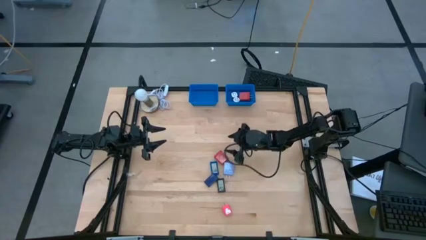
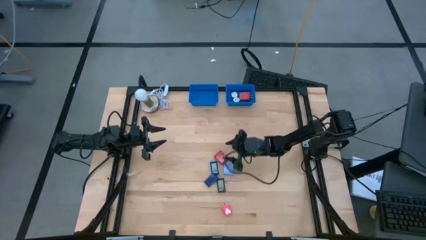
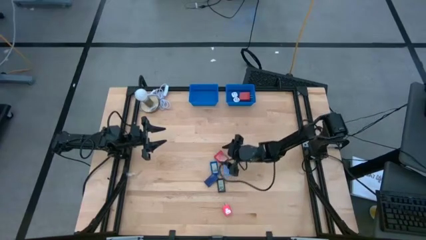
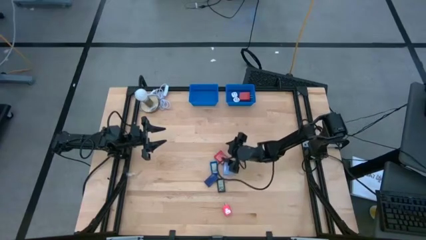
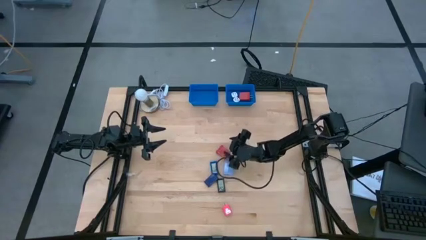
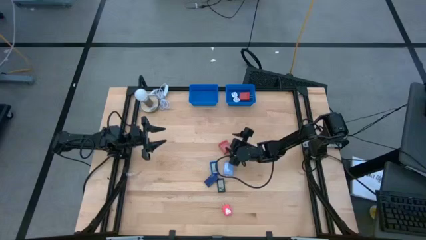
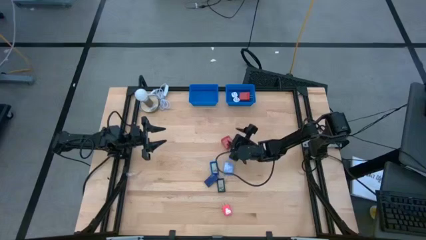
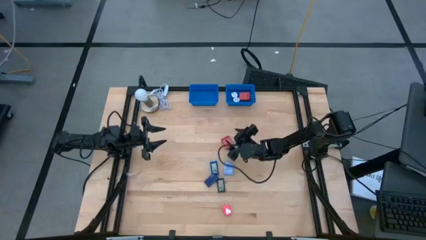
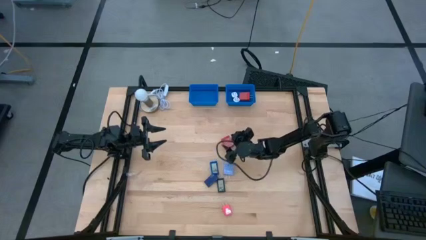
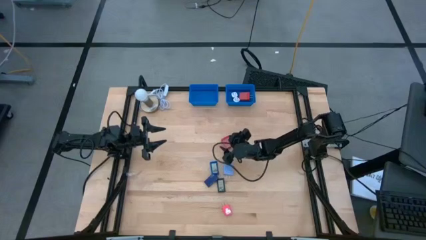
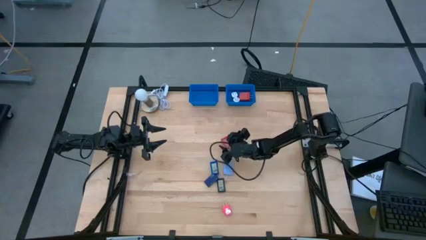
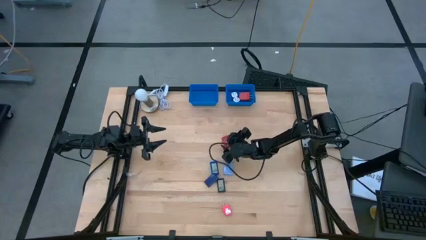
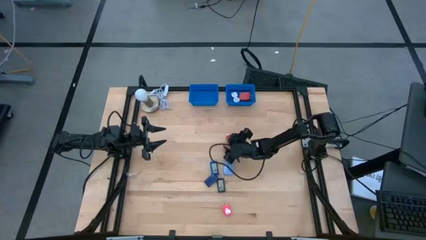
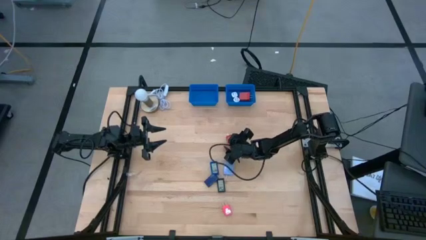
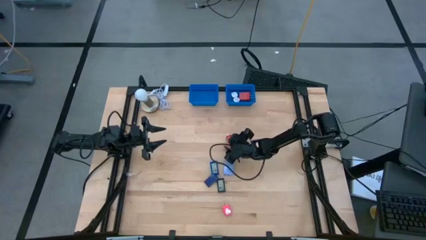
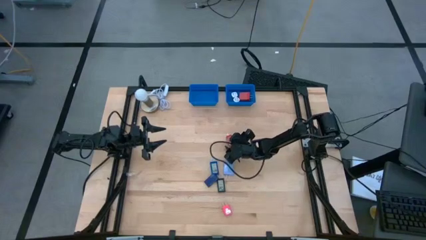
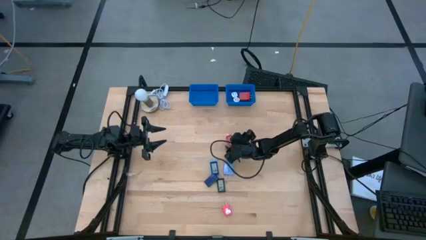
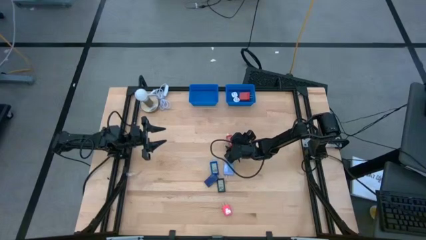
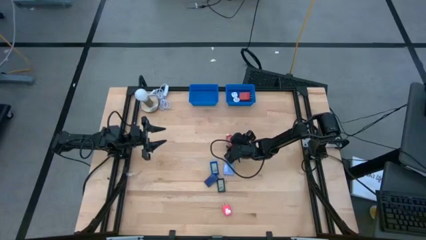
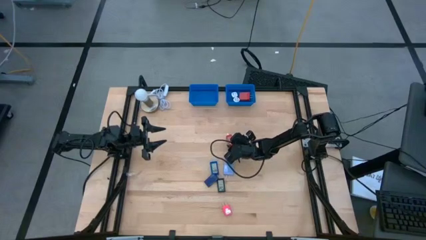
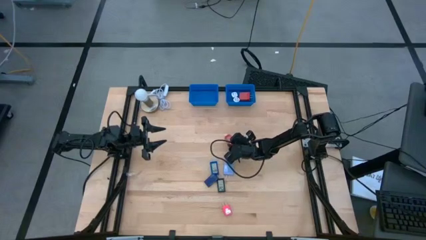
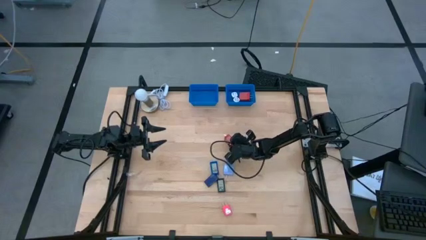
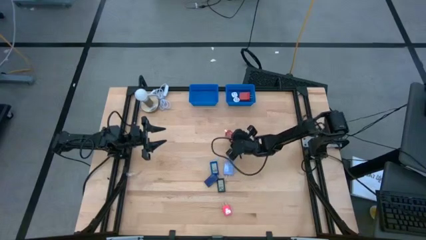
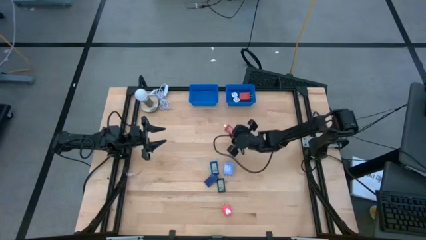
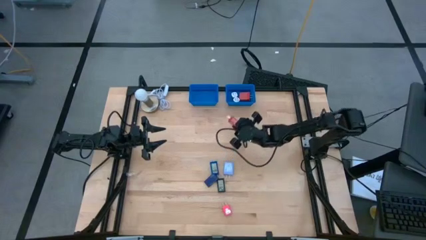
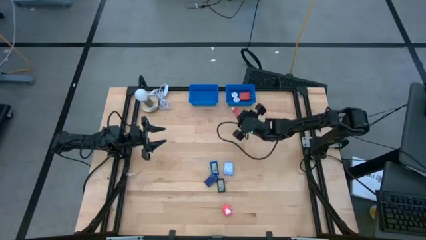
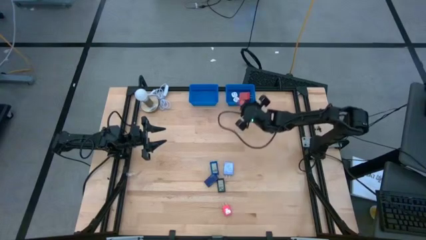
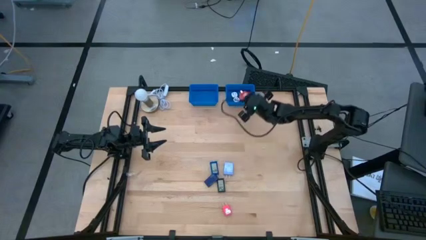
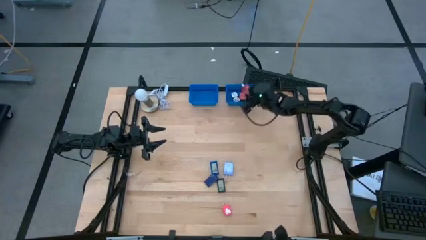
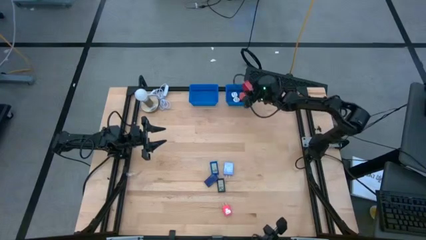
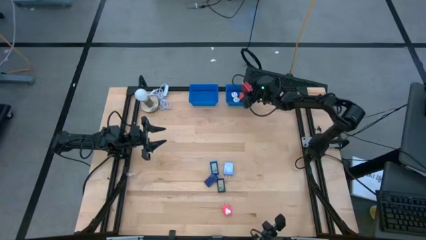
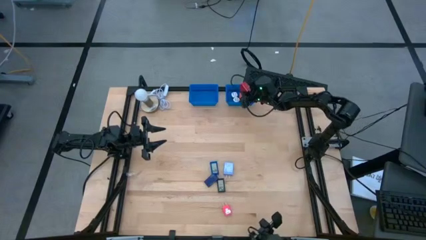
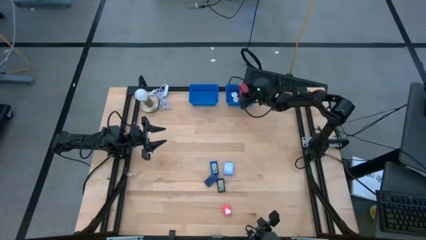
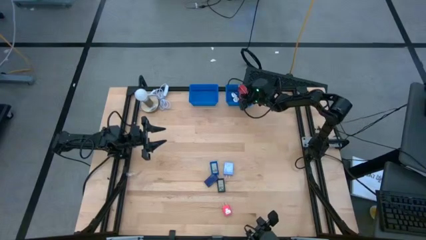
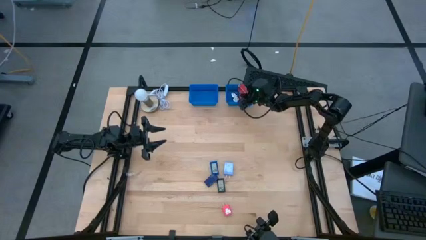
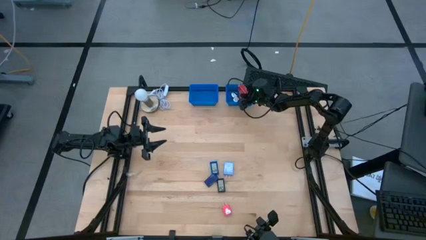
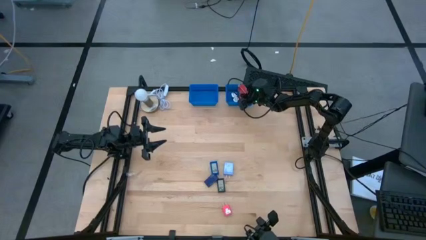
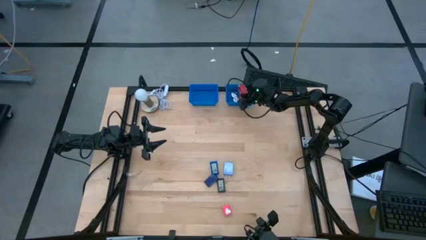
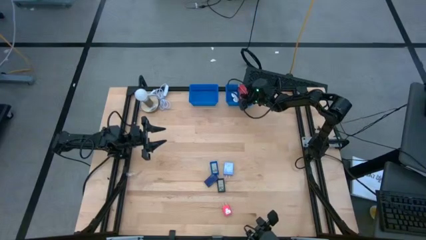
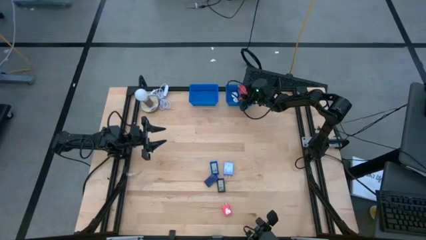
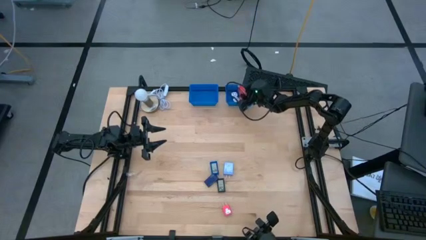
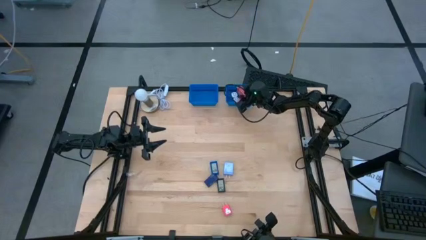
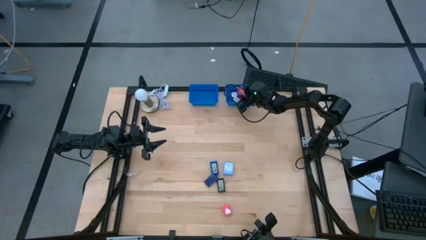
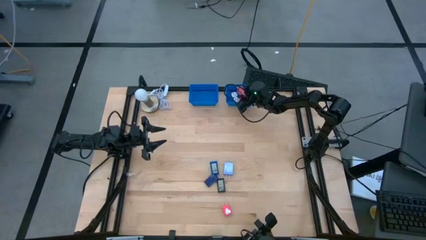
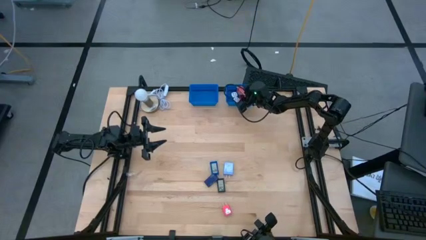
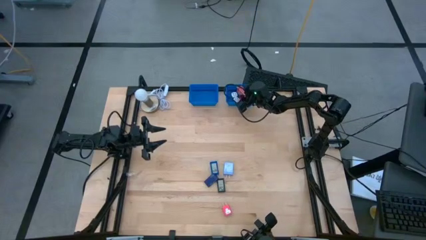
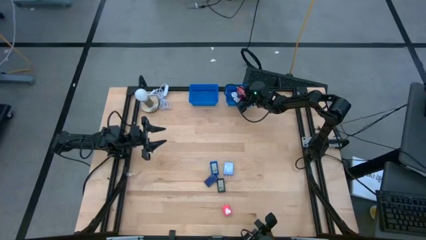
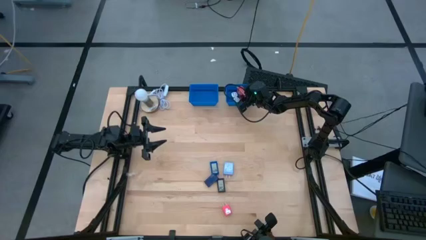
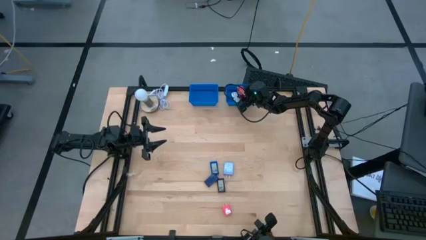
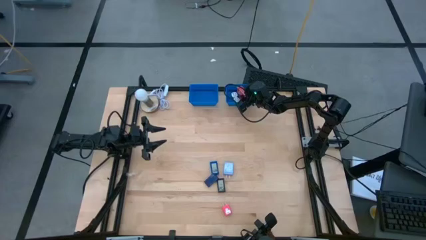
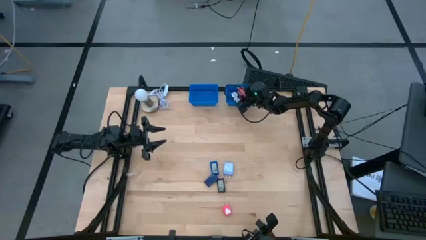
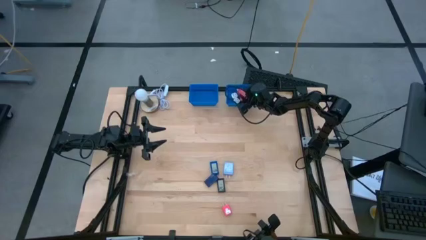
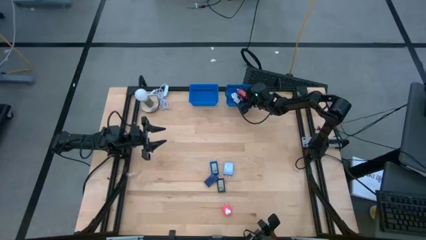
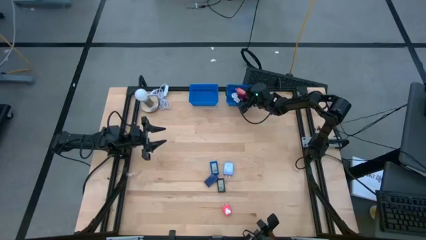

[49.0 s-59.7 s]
Task: Pick & Place Office items
Put the red charger adapter into the right blue bin

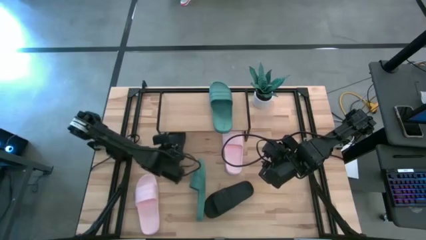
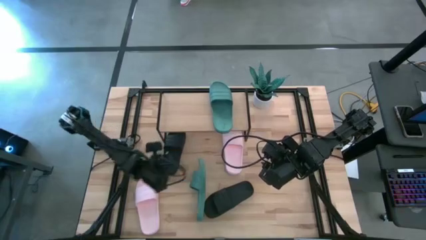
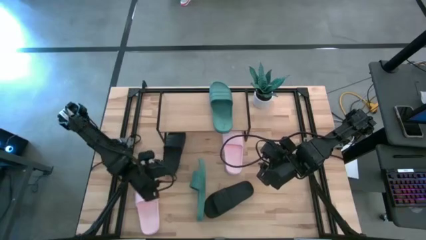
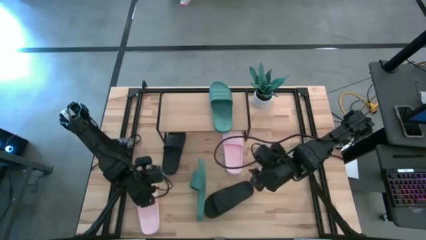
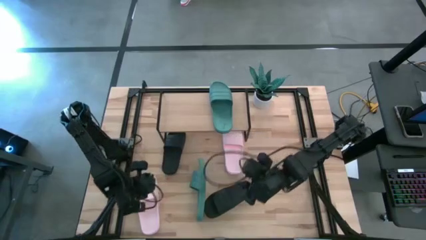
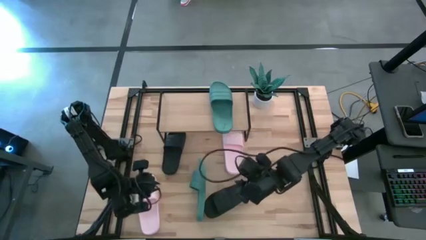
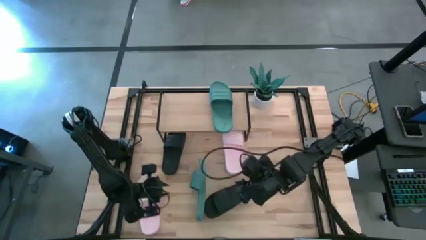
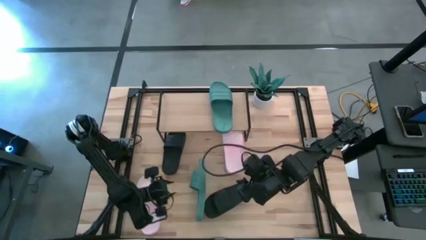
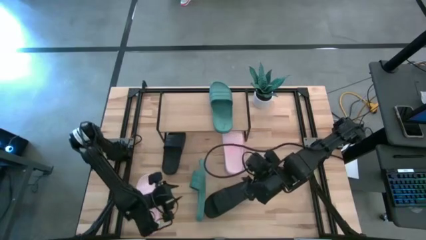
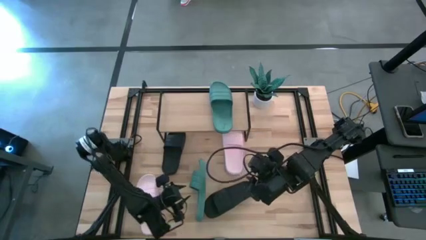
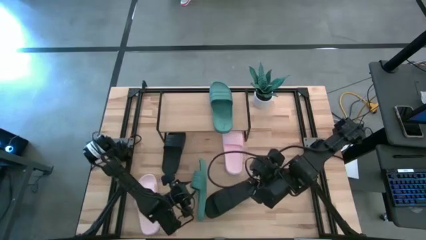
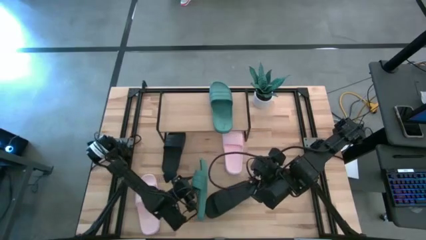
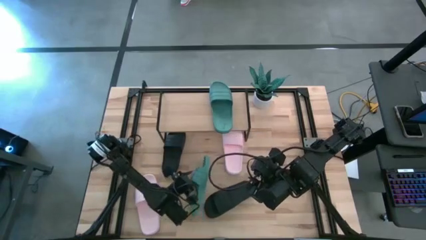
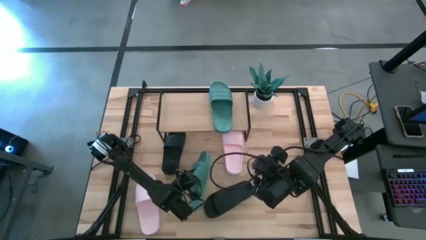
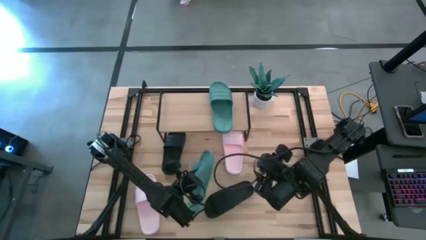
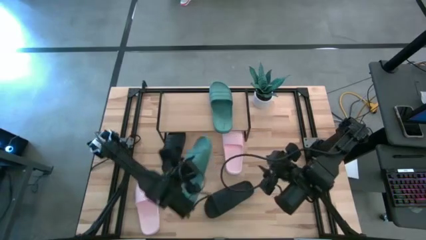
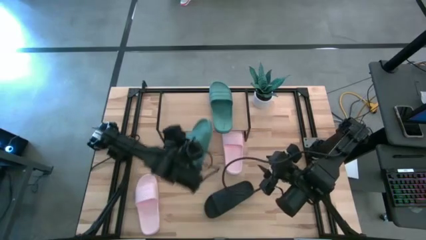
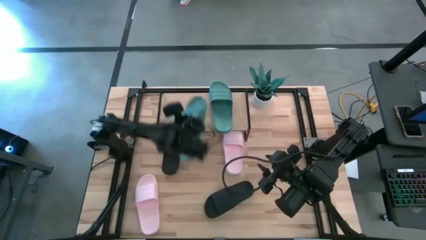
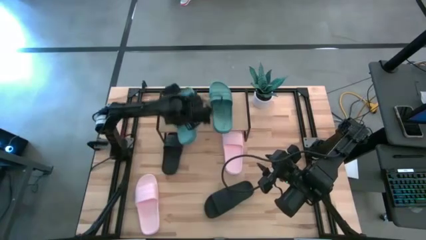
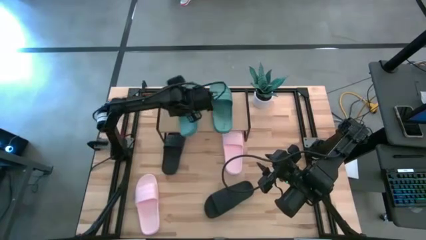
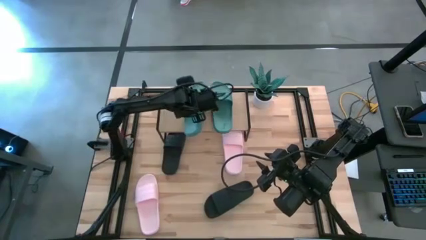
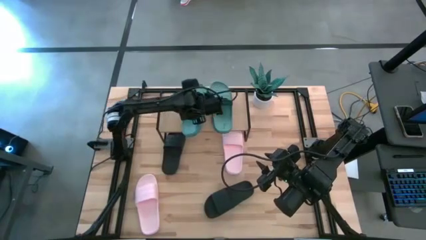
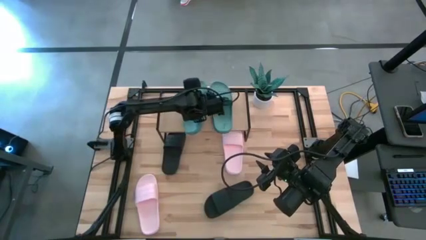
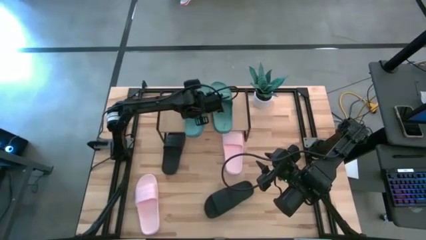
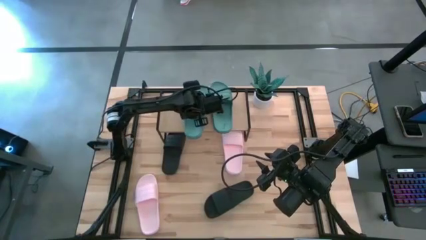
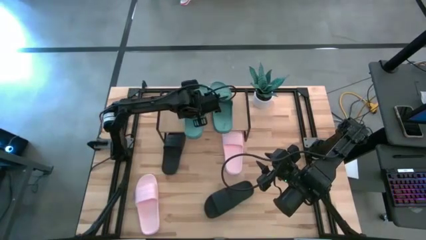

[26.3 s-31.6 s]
Task: Pick and place slides into the shelf
Put the green slide on the shelf
